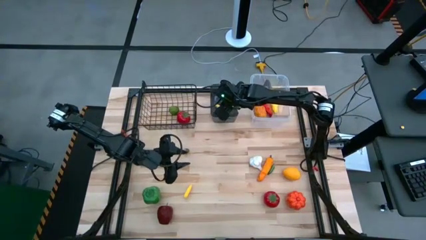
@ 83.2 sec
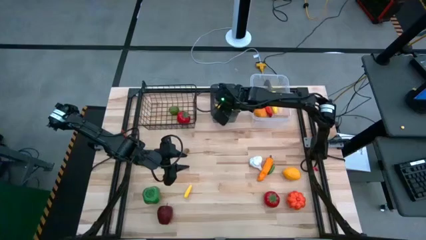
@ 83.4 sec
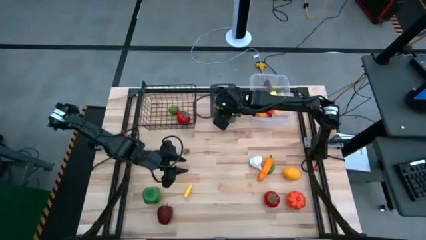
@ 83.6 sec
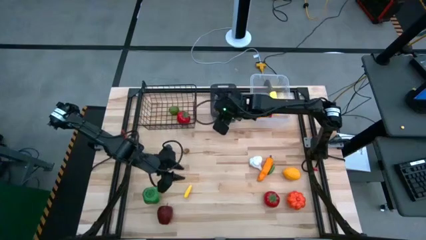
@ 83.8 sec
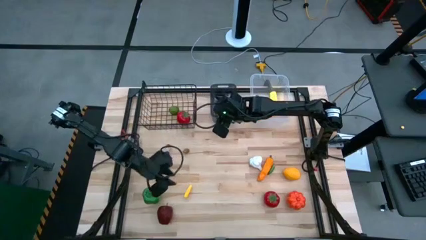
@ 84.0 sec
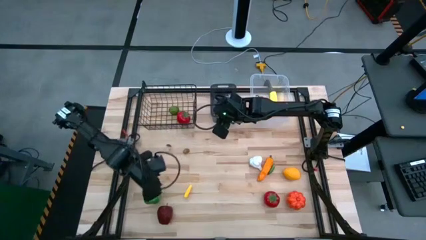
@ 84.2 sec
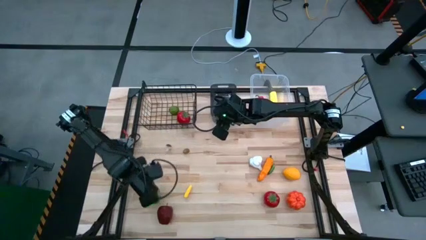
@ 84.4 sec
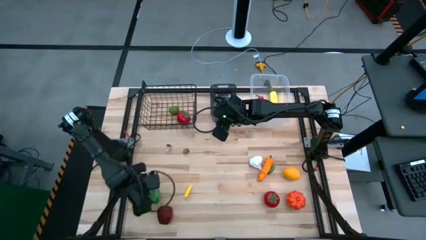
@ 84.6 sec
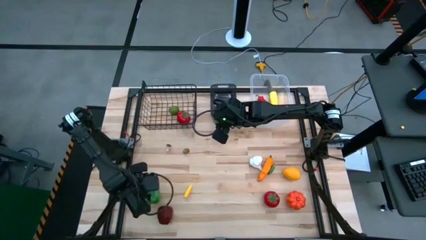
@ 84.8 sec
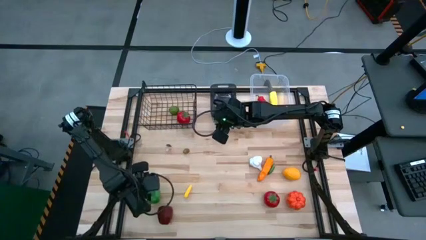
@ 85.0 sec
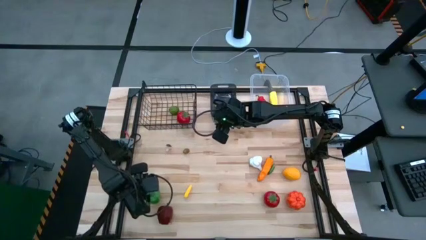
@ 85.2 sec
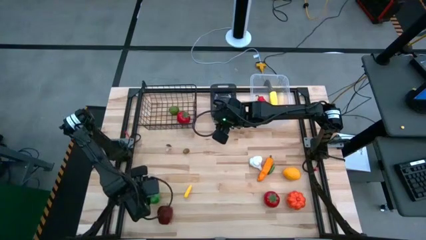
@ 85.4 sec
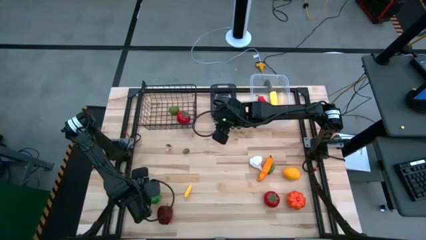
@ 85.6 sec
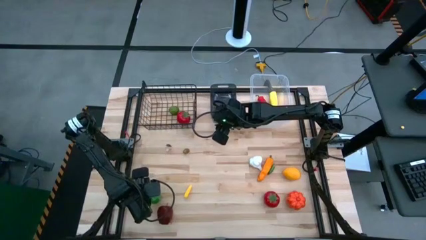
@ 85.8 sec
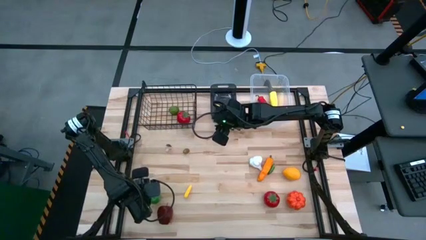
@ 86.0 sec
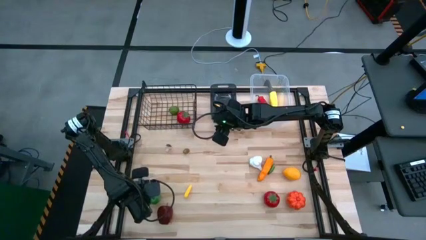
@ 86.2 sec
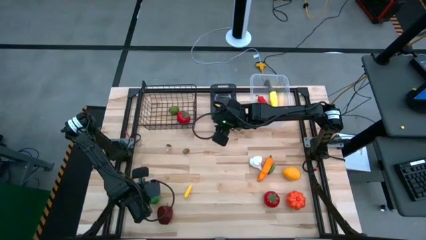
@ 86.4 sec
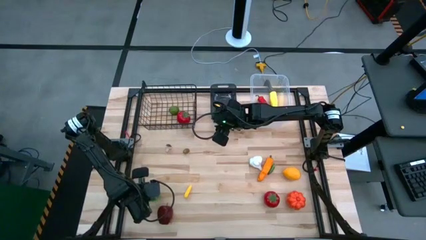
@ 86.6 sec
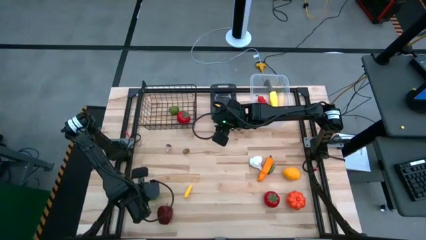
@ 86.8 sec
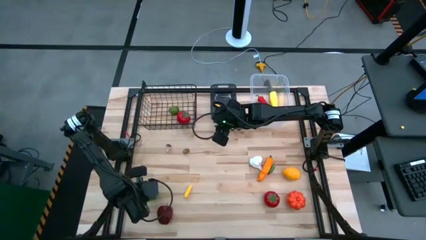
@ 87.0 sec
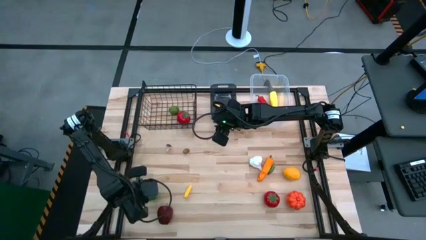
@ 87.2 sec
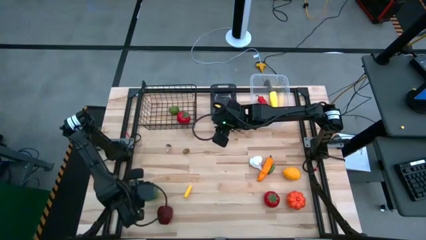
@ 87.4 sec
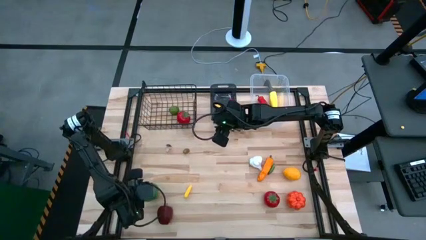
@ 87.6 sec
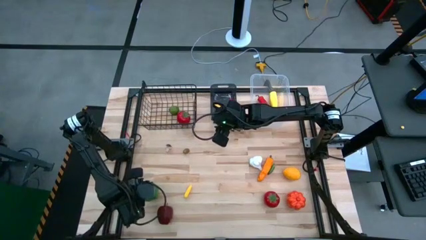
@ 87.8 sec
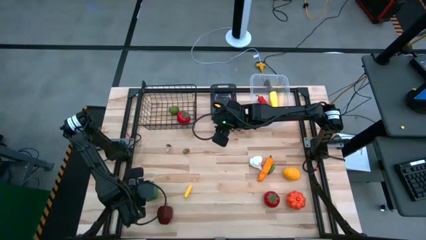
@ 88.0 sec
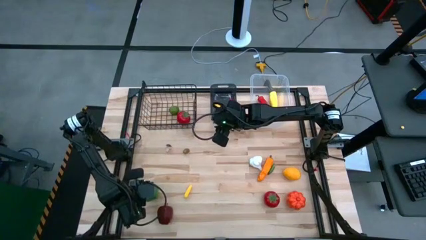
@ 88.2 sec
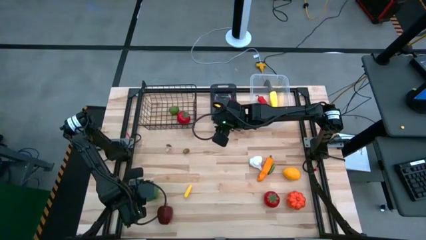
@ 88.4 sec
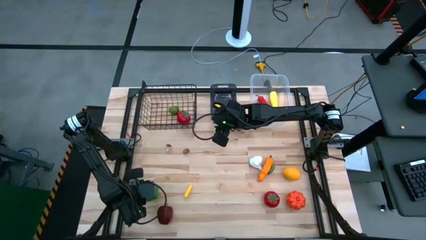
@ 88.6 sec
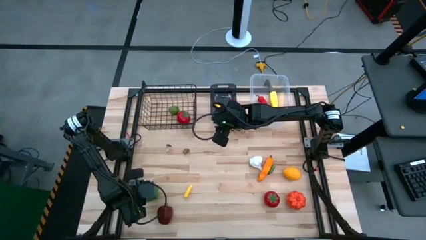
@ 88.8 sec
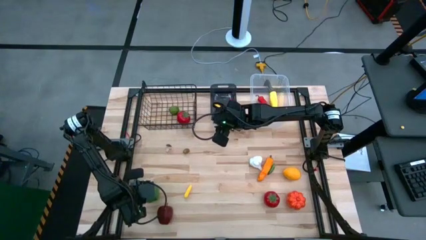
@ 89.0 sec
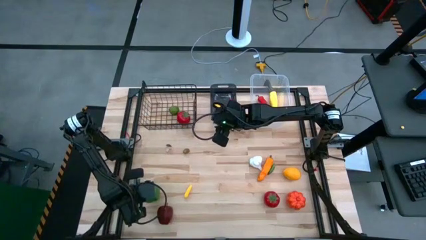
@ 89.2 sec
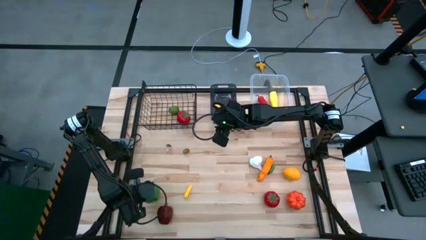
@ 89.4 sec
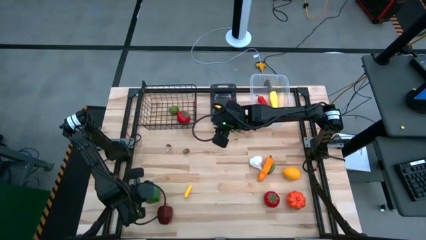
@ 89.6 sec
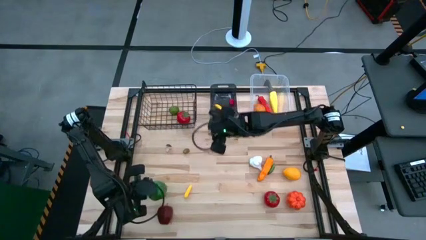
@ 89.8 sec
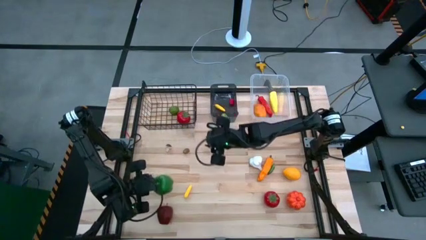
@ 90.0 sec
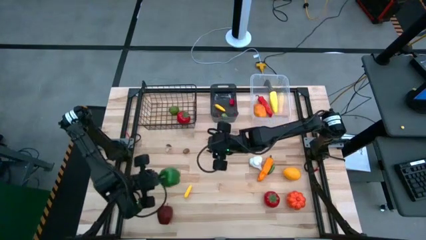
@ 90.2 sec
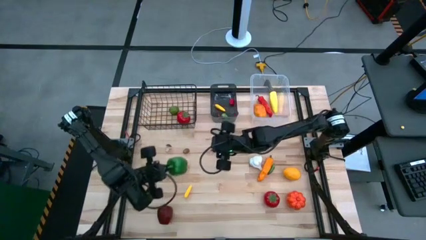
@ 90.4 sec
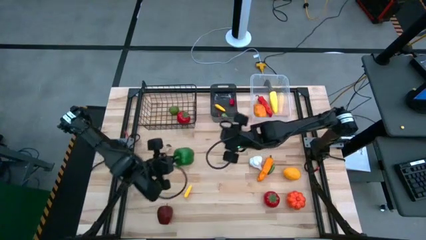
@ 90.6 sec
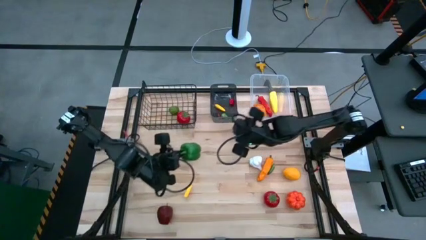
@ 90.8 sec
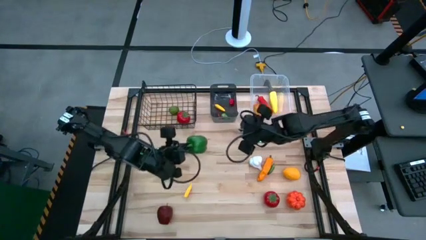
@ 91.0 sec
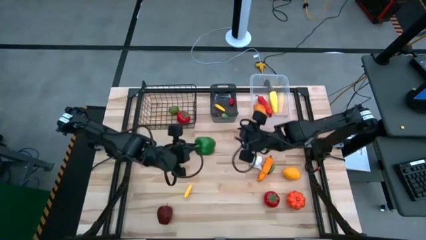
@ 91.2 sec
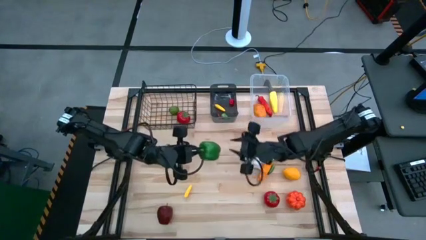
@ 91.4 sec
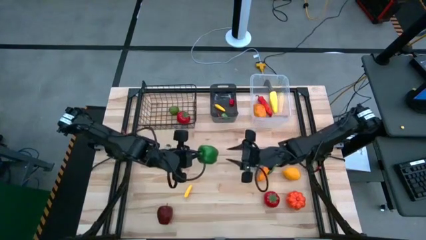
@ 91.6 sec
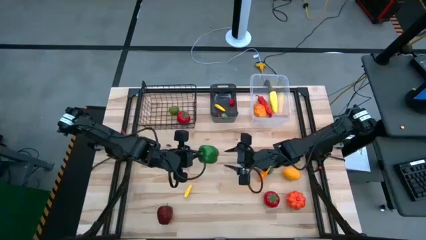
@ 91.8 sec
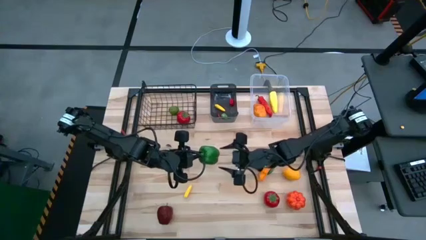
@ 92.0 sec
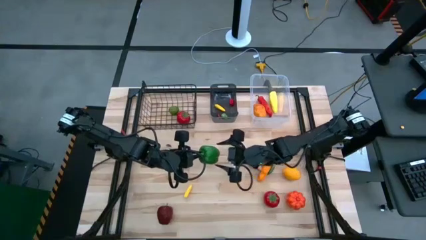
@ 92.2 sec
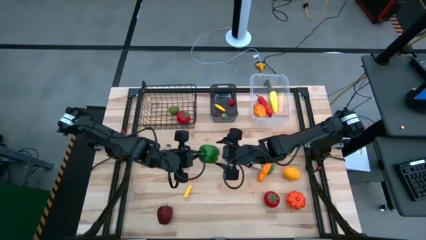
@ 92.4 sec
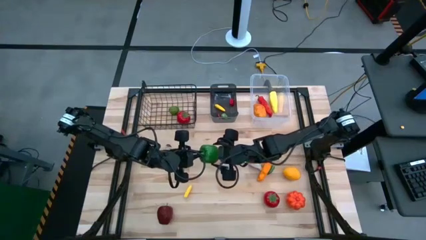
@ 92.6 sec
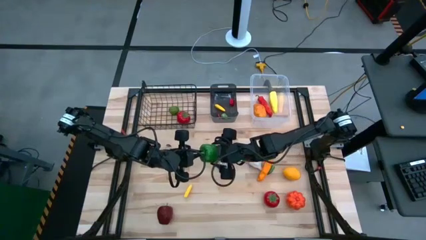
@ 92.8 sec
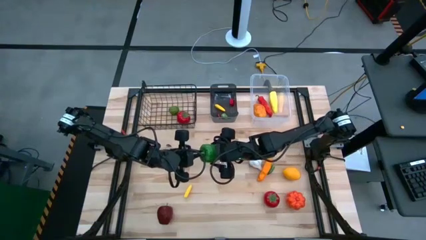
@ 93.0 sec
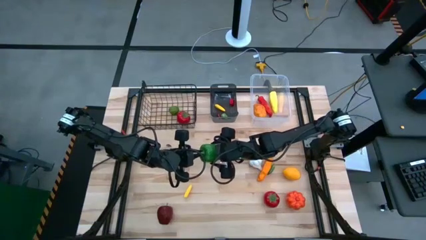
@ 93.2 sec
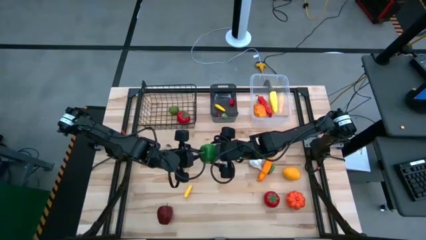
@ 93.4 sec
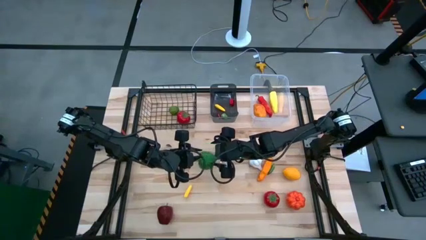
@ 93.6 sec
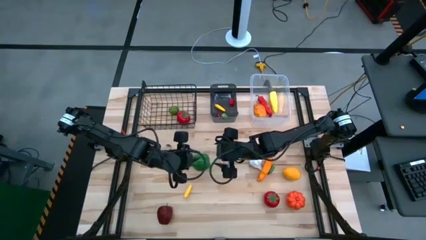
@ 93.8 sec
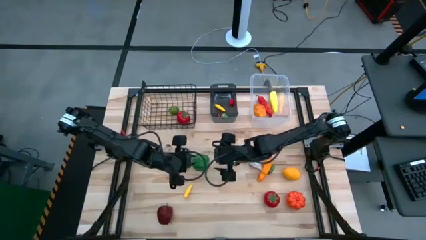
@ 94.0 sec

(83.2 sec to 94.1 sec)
Task: Sort produce into baskets
Put the large bell pepper into the transparent bin

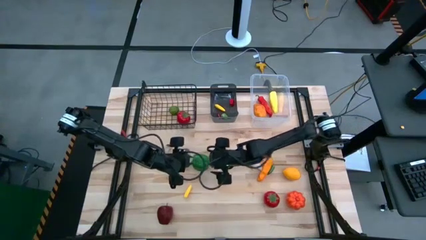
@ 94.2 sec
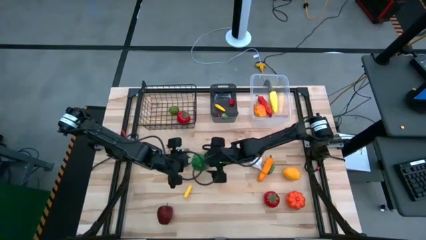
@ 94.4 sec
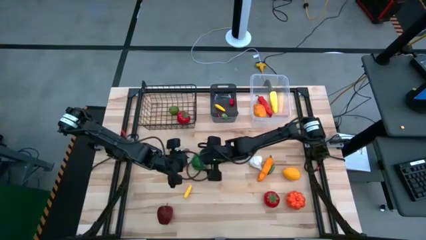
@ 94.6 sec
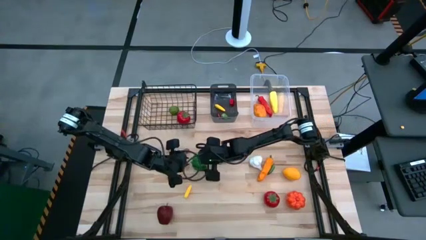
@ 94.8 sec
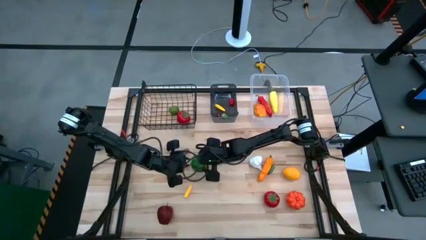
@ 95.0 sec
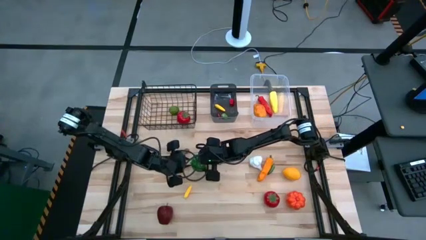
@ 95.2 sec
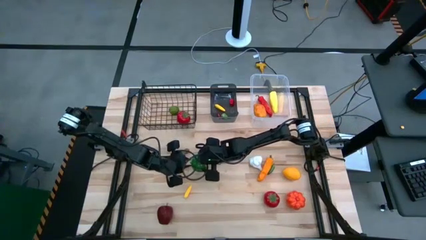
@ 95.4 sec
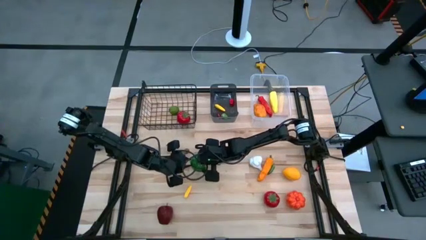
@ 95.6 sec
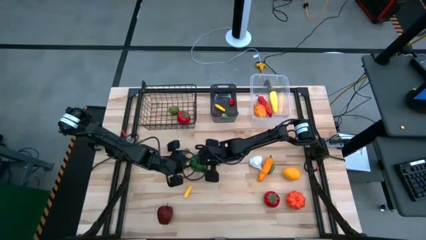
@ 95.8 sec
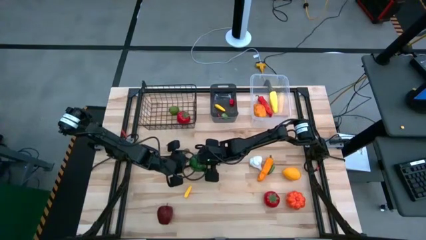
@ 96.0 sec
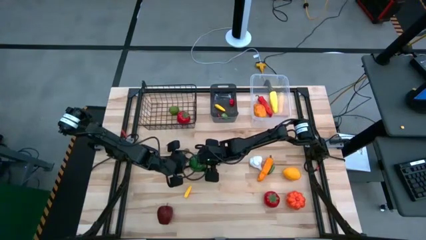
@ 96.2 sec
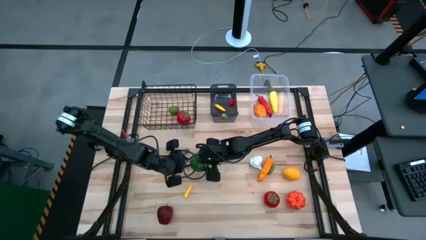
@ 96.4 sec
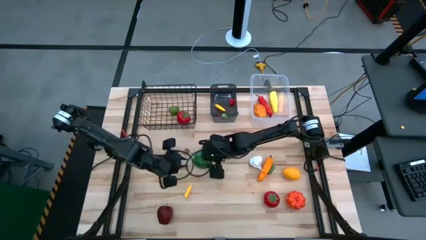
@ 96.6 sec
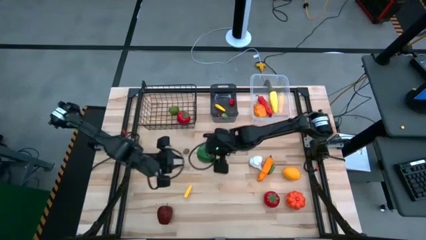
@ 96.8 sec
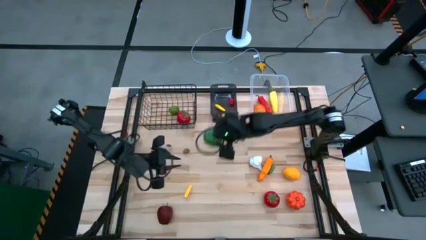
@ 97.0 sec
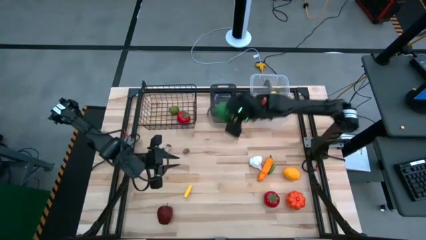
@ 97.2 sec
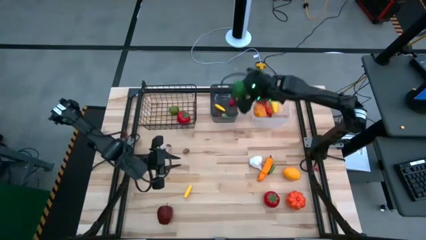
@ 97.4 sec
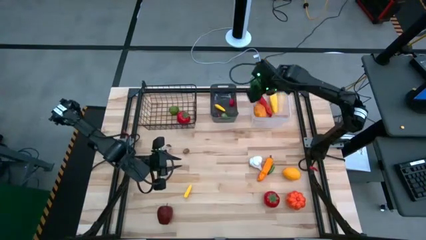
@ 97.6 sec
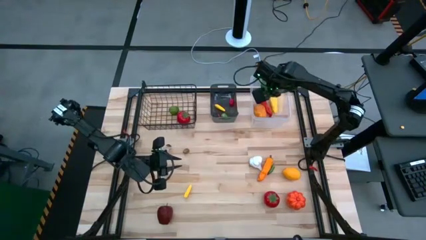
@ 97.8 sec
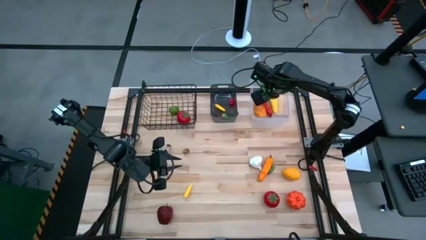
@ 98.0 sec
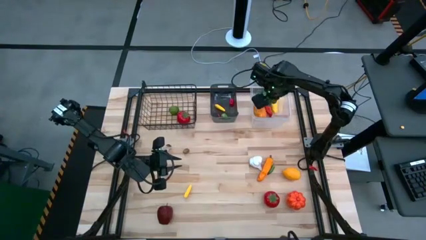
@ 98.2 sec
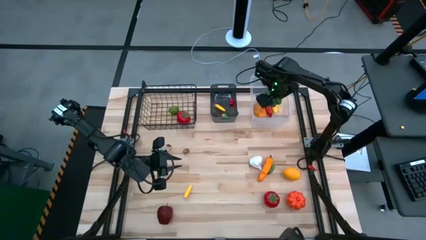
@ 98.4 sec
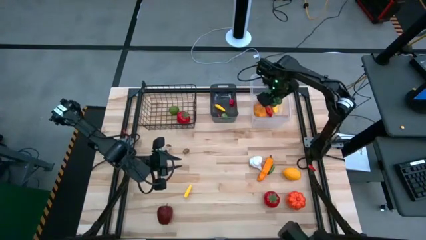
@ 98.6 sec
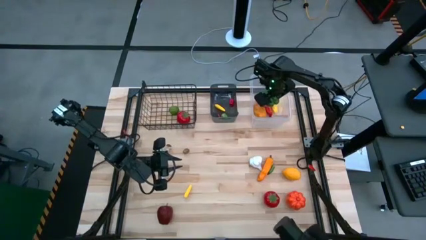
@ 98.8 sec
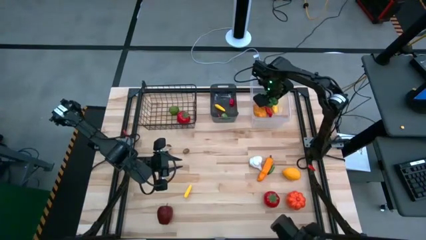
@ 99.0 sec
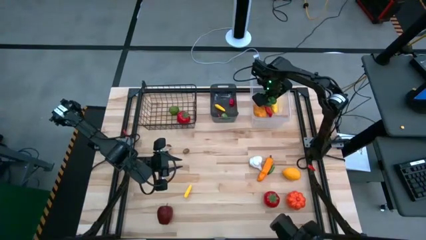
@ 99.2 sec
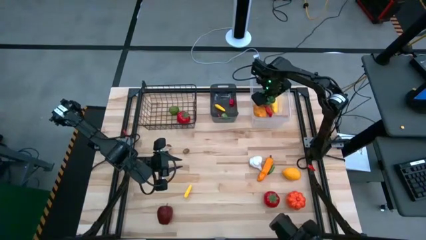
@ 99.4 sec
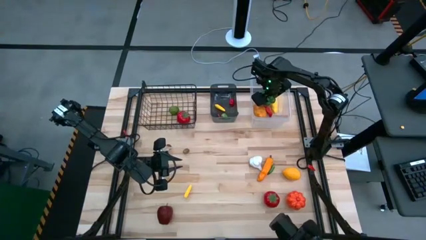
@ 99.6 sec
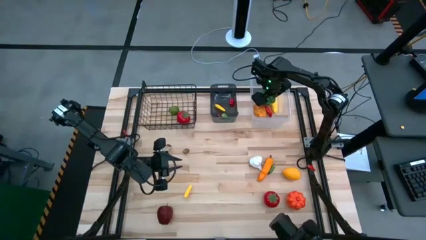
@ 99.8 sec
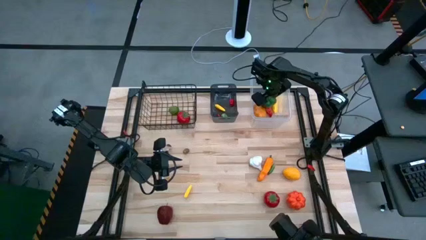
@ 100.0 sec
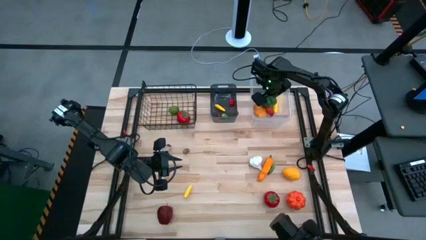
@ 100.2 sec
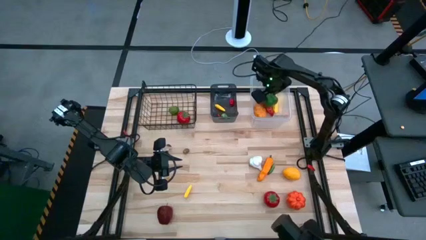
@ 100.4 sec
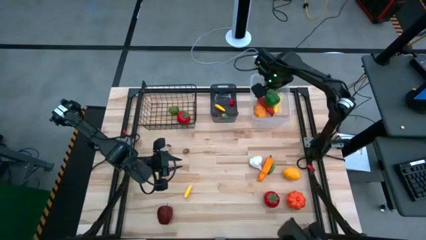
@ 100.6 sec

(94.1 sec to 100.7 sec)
Put the large bell pepper into the transparent bin
